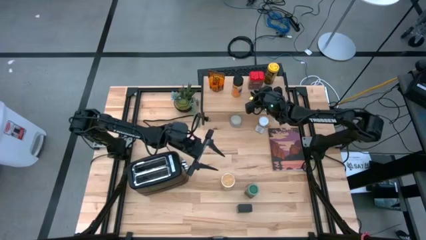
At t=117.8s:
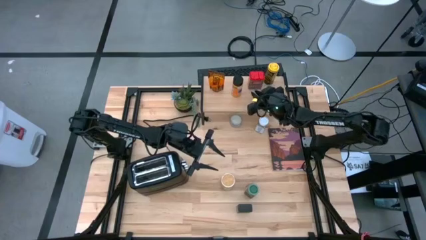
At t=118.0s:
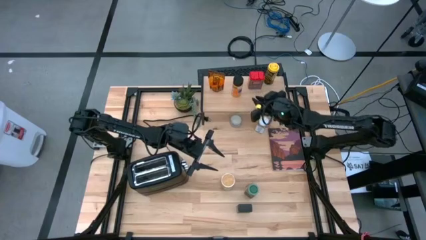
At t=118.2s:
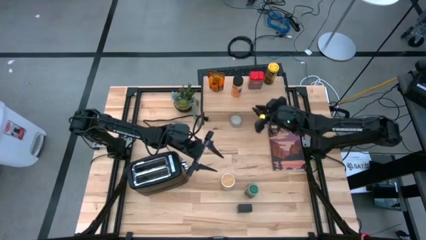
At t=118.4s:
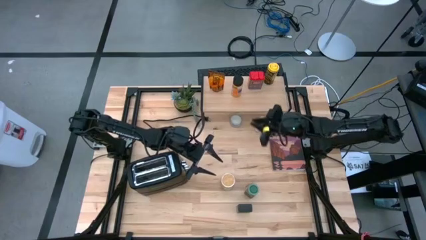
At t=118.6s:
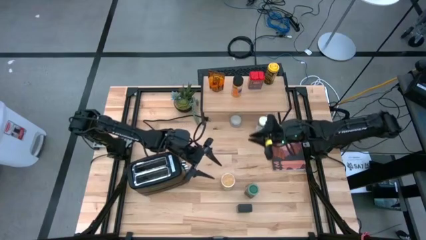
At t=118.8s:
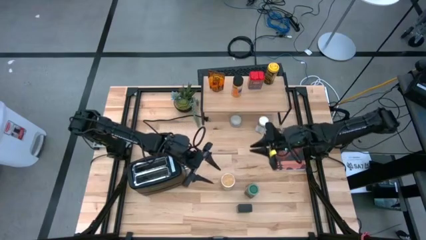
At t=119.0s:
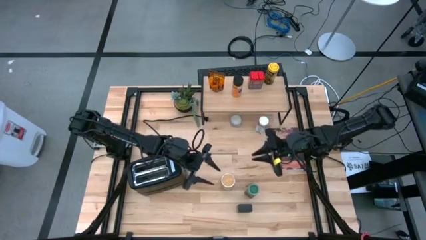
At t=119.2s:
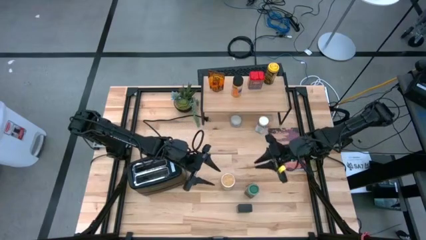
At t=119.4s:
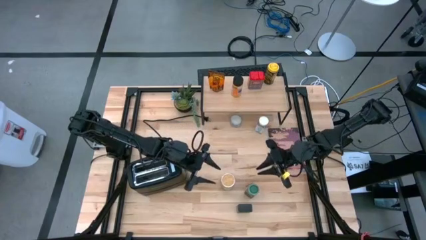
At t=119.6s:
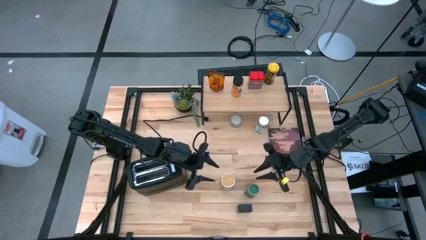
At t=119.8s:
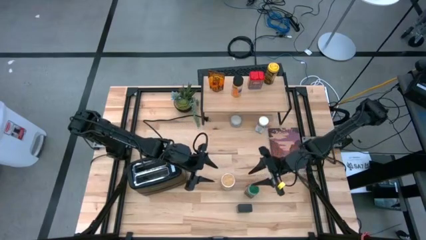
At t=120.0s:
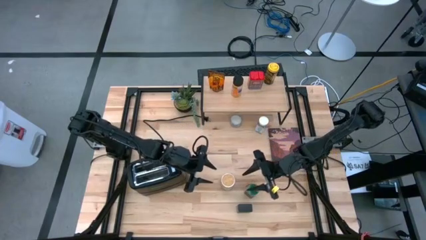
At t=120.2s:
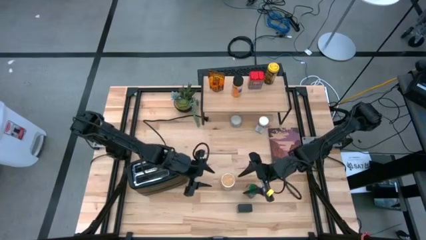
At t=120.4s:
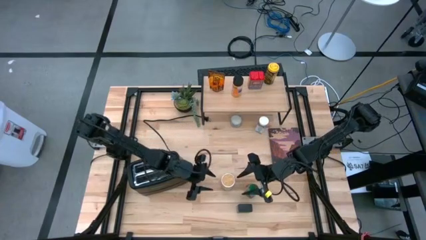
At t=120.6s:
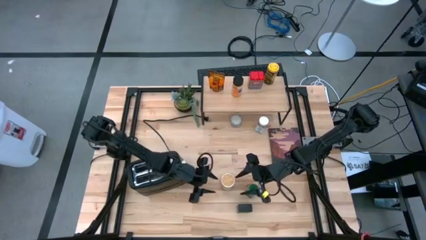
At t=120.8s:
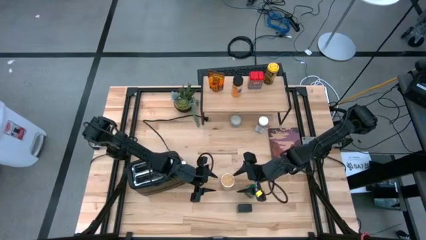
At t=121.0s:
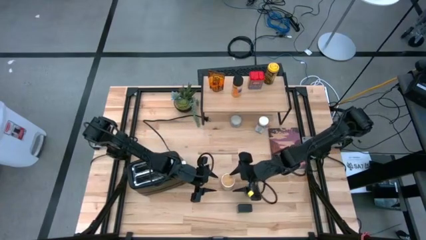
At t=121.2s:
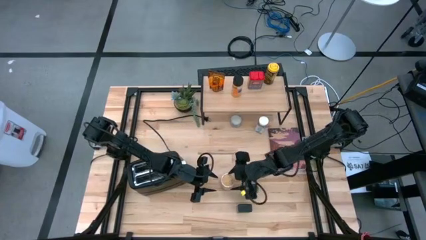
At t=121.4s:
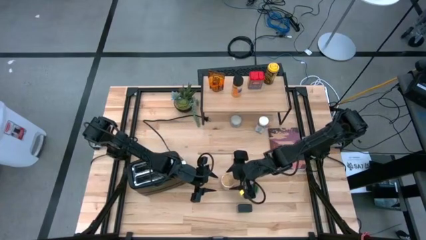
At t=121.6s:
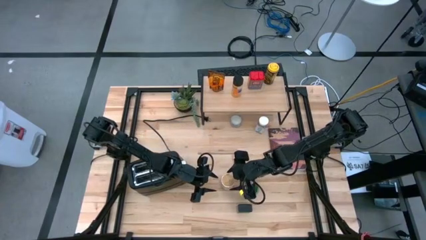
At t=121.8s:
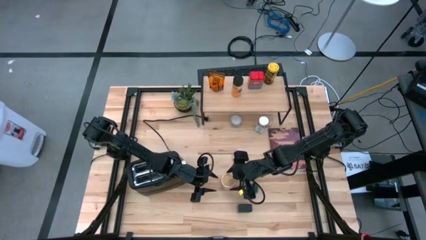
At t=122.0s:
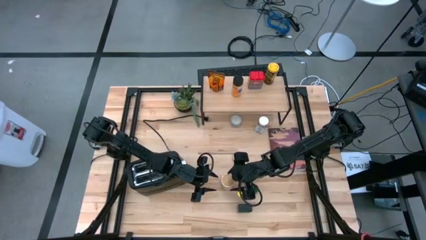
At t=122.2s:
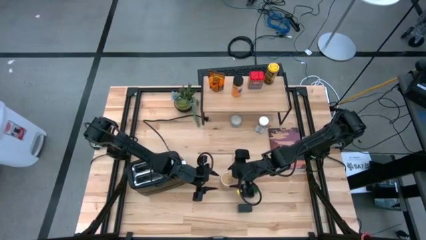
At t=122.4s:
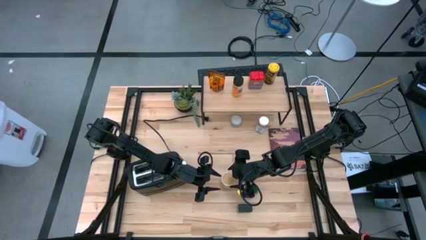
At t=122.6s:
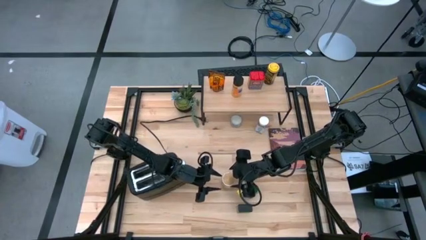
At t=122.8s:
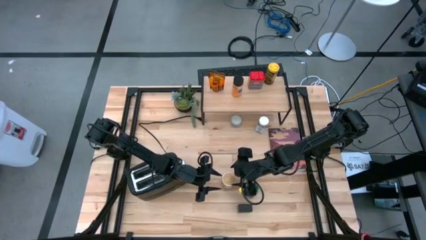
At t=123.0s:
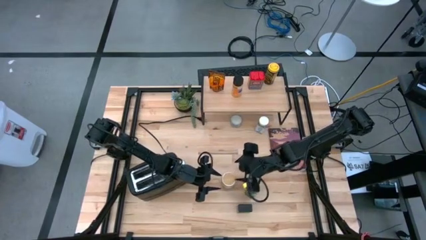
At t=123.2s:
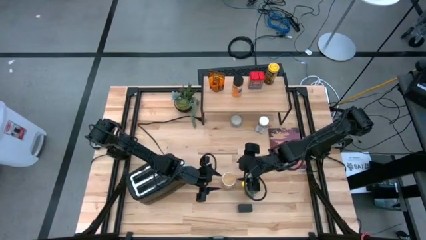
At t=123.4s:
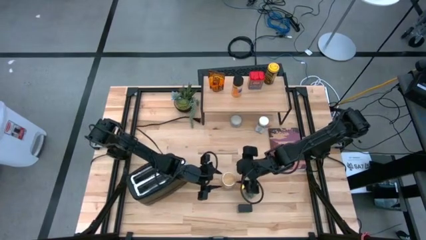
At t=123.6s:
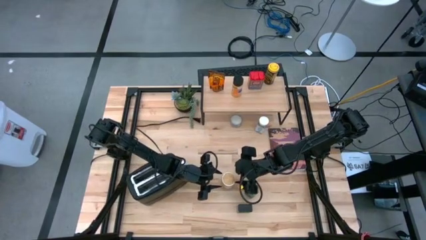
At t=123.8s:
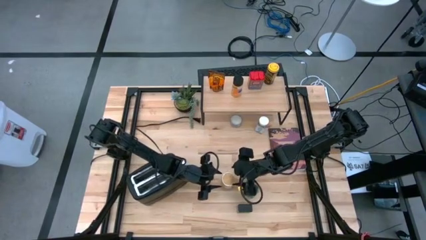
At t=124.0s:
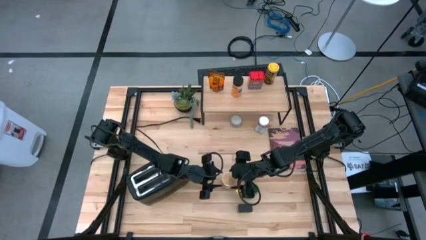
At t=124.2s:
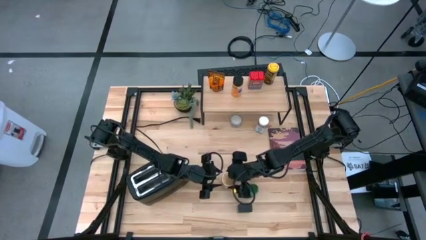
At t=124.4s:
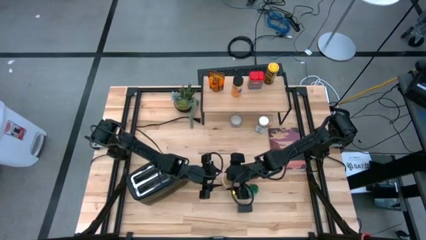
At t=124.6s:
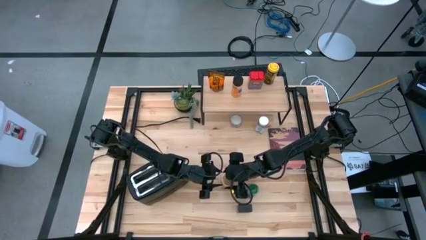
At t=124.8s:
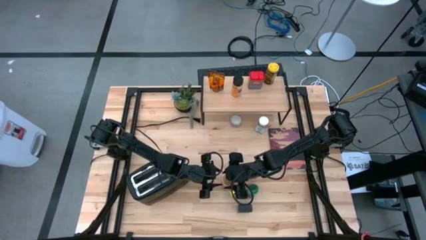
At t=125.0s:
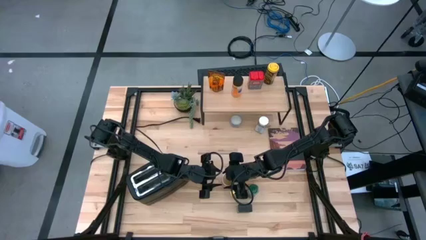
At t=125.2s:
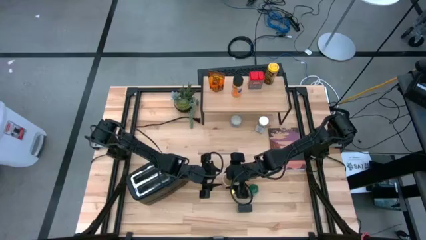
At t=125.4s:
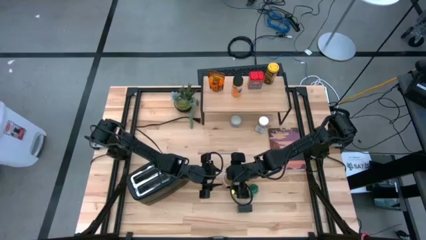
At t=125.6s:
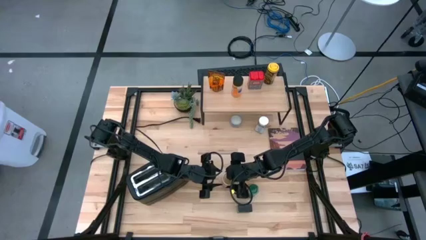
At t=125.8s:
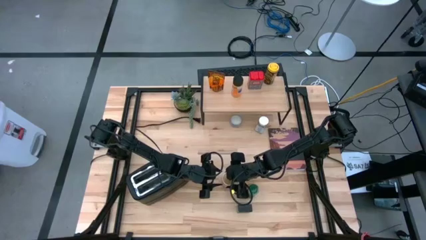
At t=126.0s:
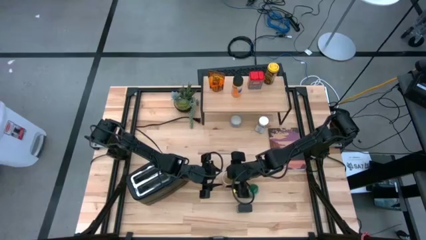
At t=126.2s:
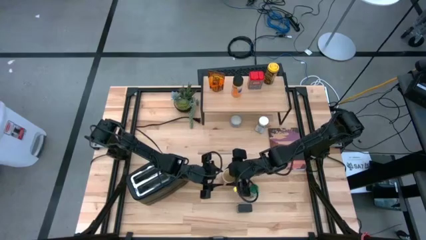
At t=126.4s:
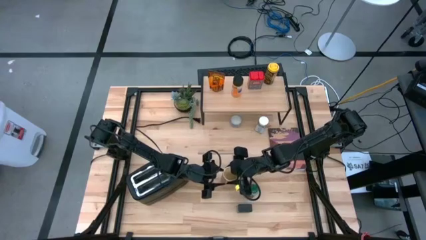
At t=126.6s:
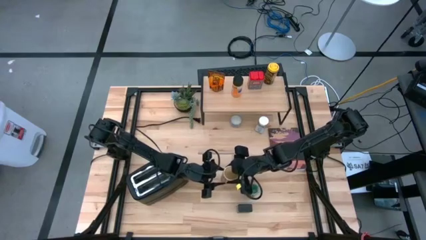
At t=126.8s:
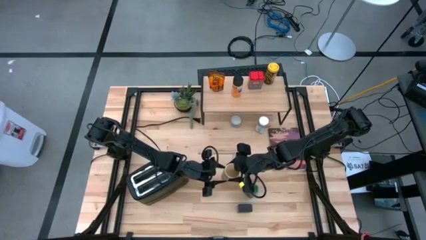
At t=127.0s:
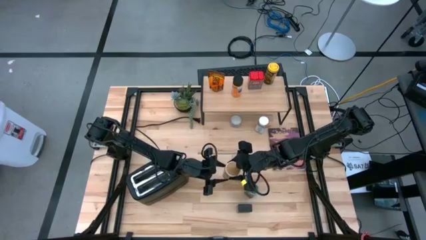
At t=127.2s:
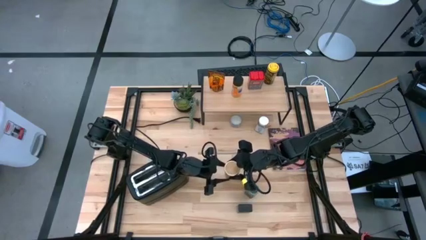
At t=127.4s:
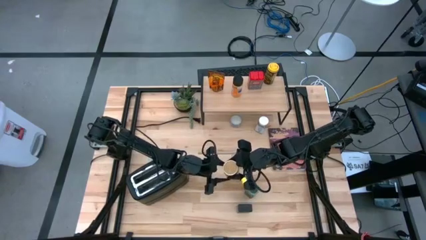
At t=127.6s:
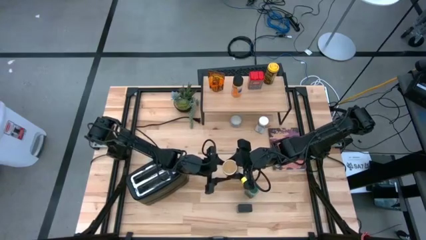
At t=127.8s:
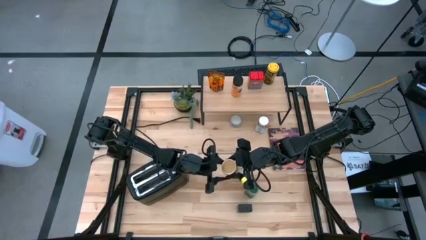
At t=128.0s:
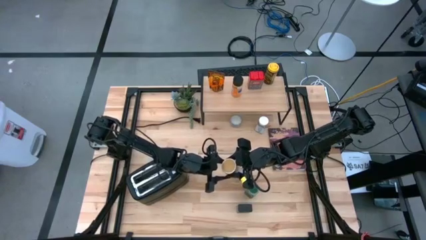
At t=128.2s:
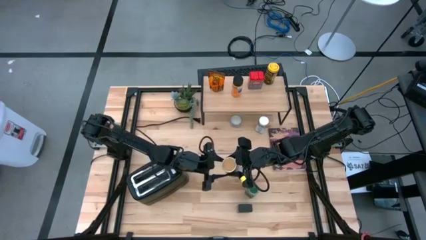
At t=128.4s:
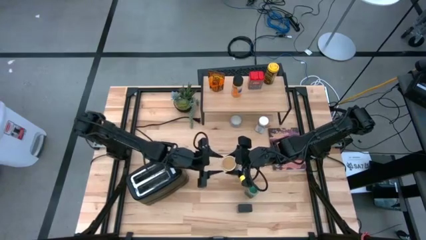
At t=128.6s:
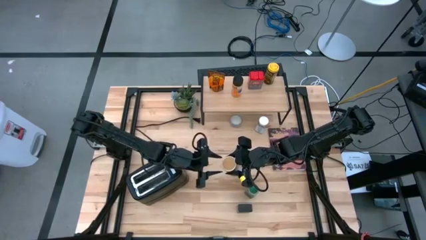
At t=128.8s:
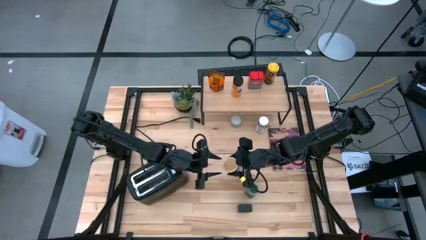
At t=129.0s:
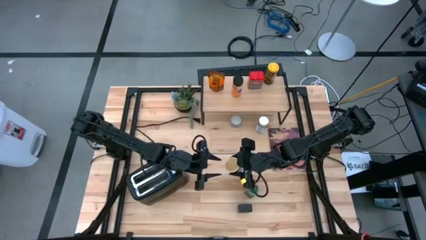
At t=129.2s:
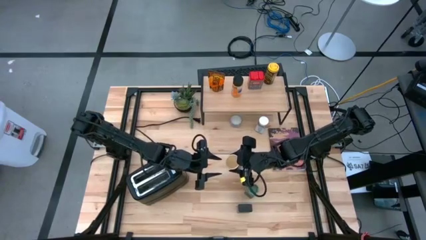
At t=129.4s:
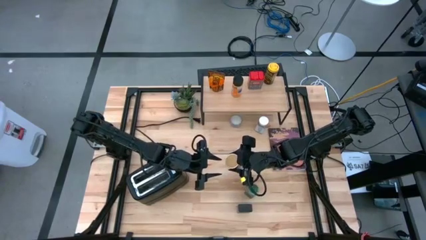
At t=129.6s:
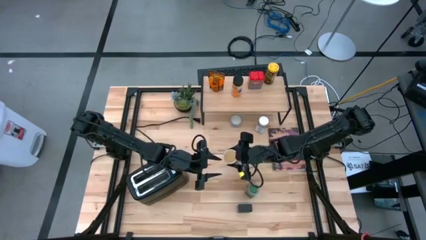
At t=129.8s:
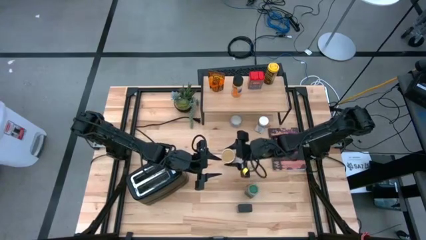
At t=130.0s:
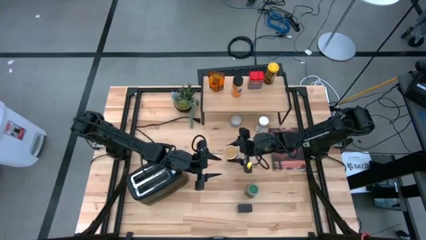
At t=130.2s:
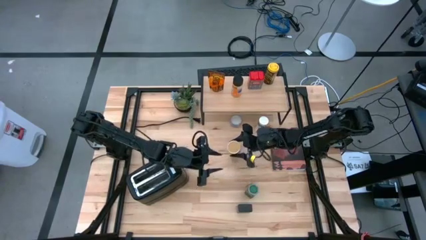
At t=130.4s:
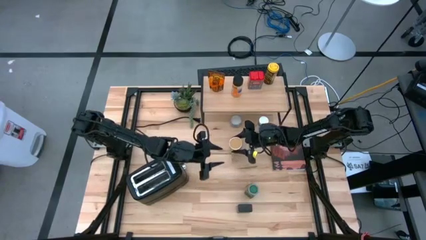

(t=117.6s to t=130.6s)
Task: Shelf spices
Put the brown seasoning bottle on the shelf

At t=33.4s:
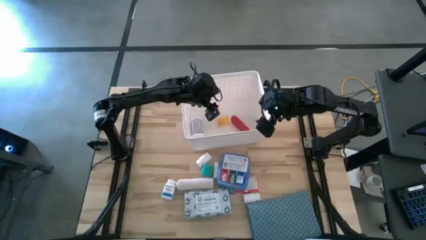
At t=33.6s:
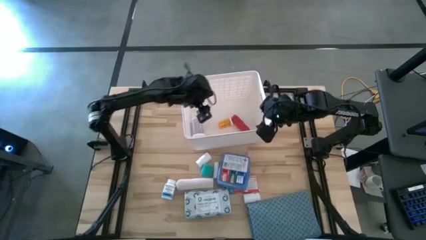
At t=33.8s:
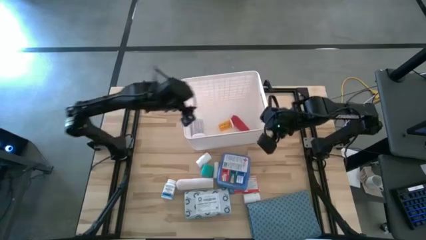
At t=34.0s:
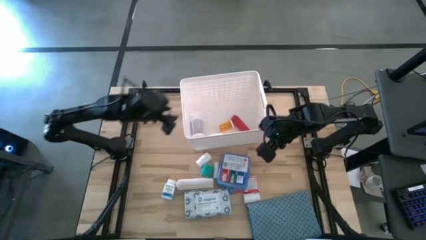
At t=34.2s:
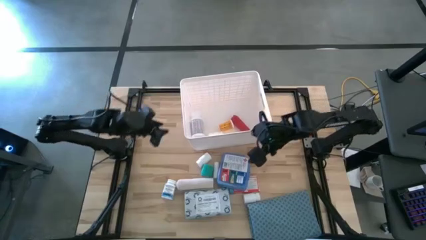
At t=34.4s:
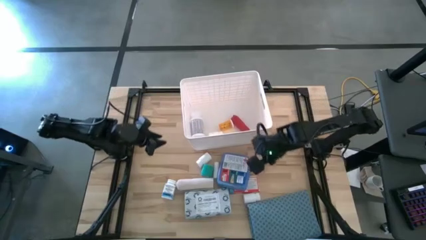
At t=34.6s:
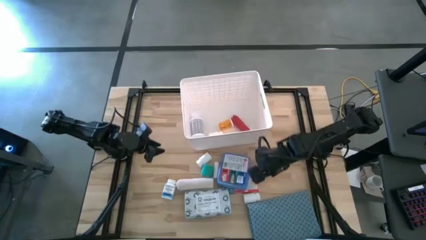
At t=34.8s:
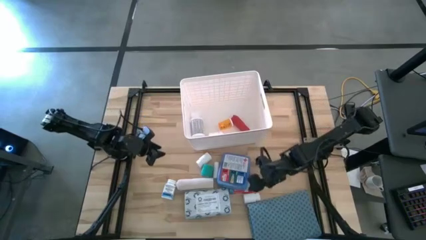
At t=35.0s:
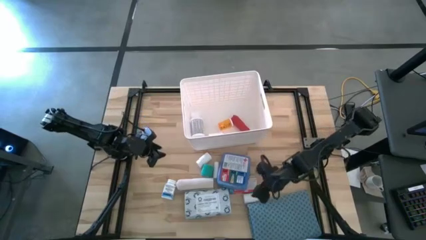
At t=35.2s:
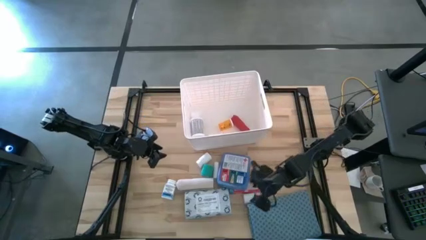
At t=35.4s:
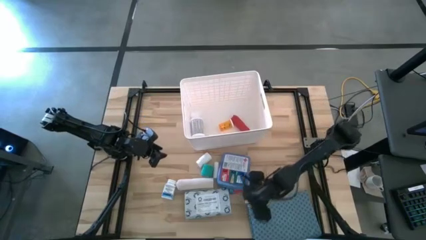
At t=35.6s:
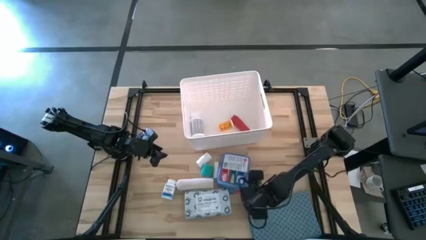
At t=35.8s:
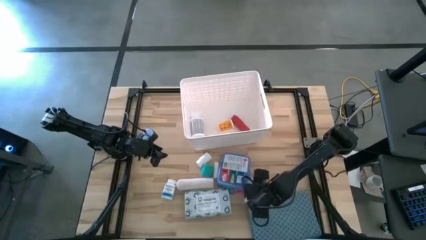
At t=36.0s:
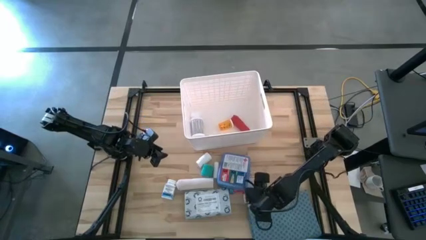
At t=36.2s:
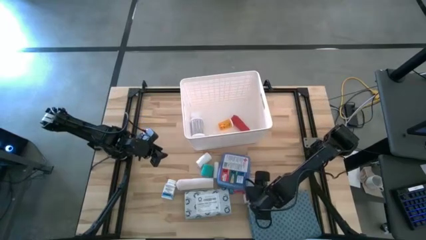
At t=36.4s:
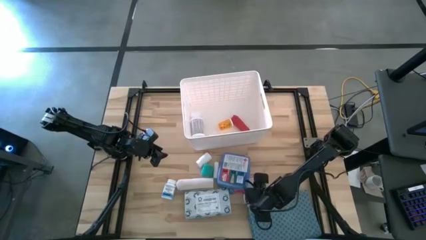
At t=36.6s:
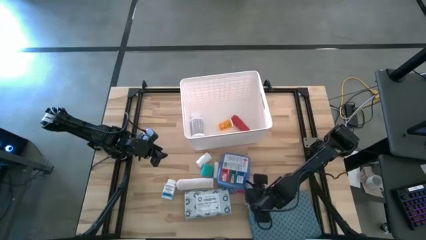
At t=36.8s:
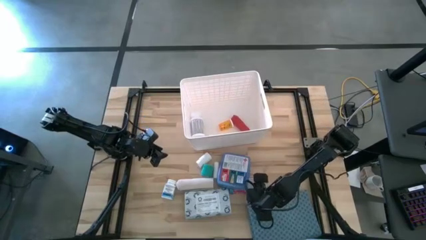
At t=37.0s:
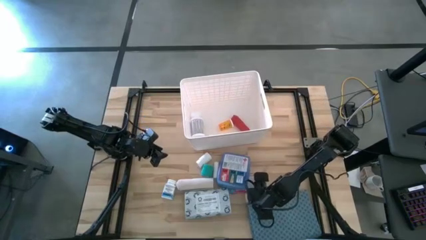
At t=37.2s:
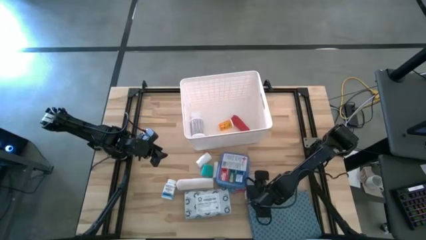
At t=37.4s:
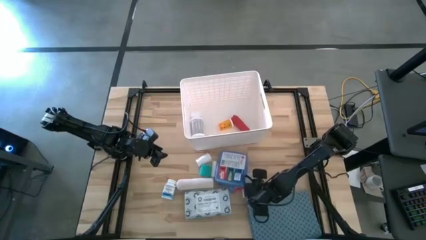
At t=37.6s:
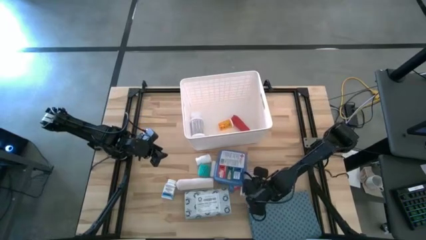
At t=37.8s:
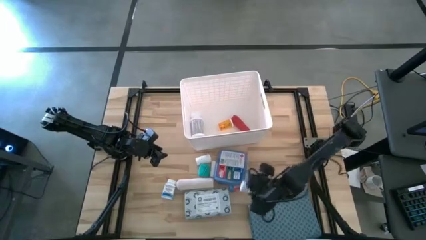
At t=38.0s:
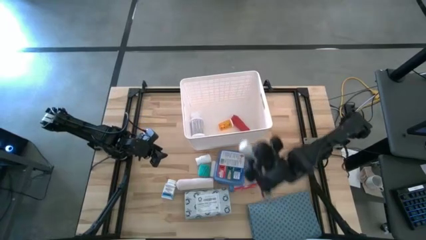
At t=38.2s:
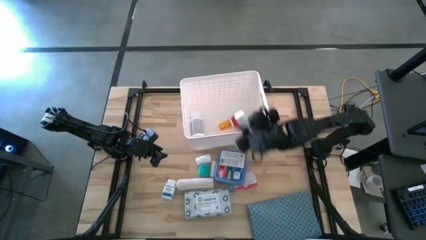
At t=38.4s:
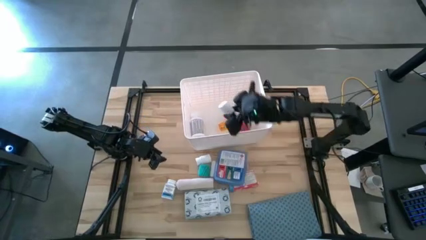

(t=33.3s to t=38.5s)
Task: Pick & place medical supplies in basket/bin
Put the bottom white pill bottle into the white bin
